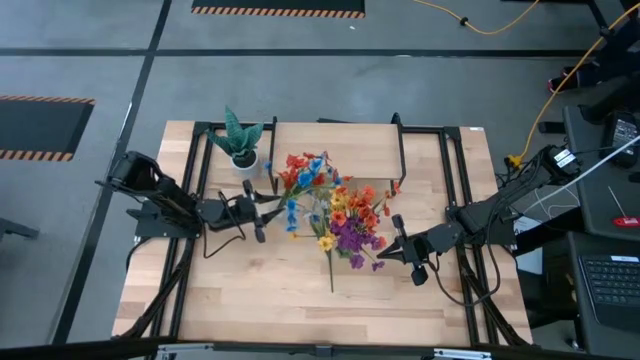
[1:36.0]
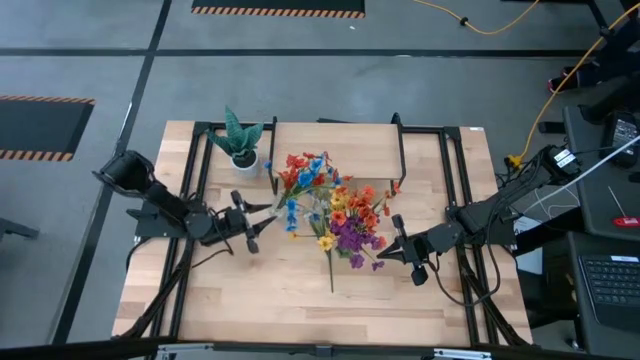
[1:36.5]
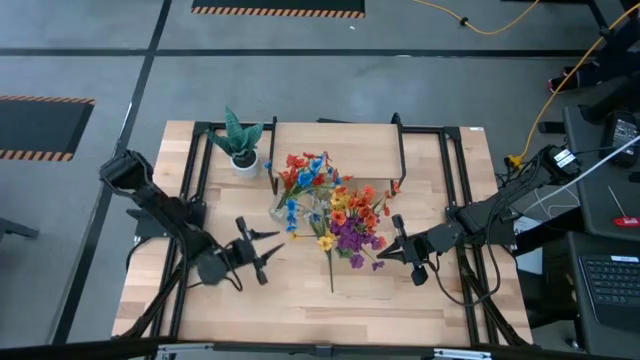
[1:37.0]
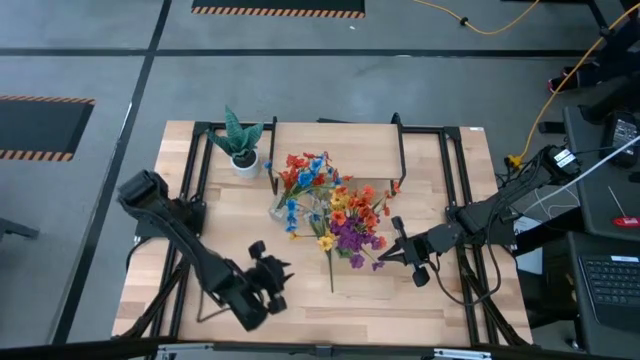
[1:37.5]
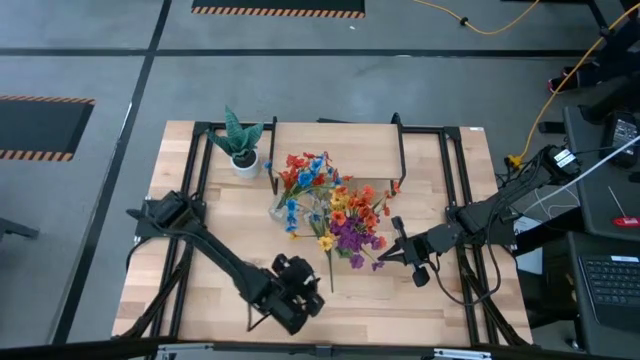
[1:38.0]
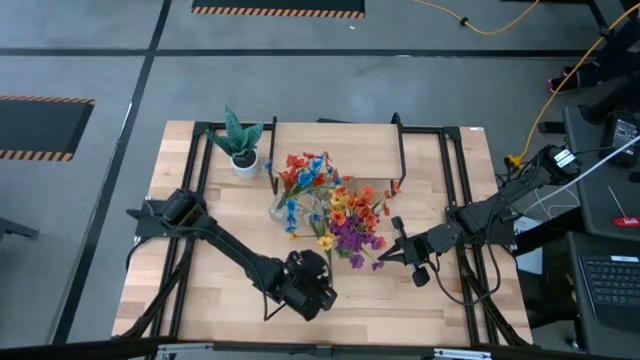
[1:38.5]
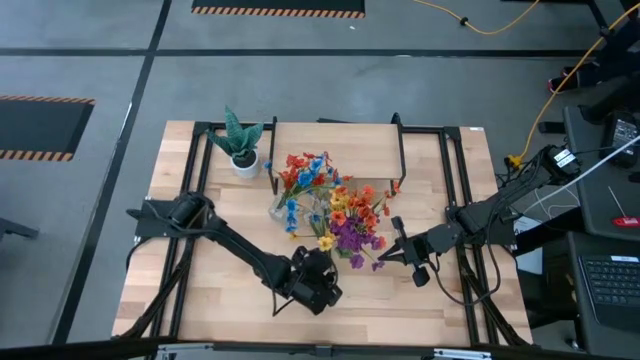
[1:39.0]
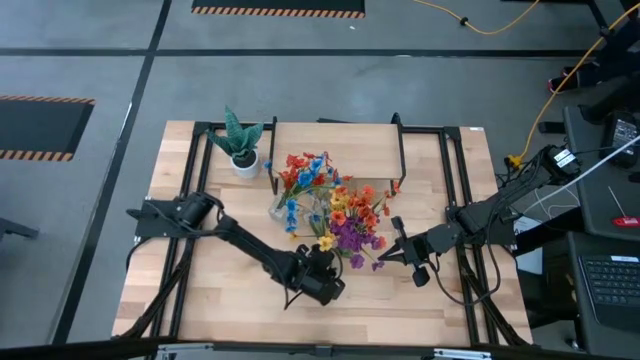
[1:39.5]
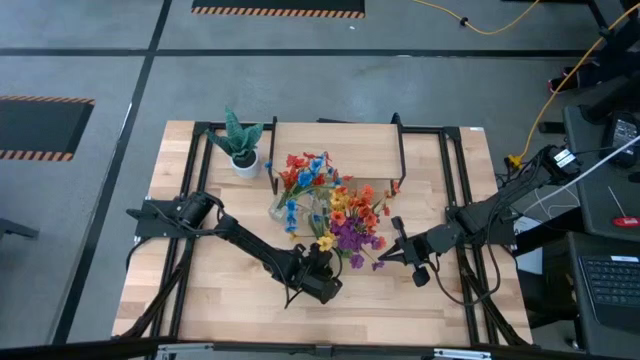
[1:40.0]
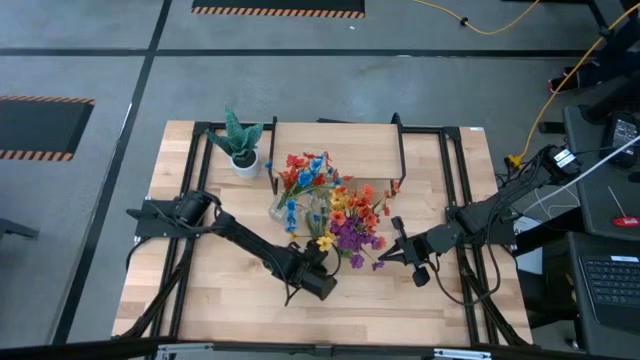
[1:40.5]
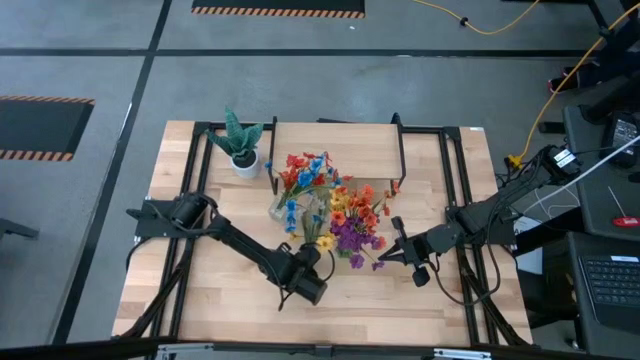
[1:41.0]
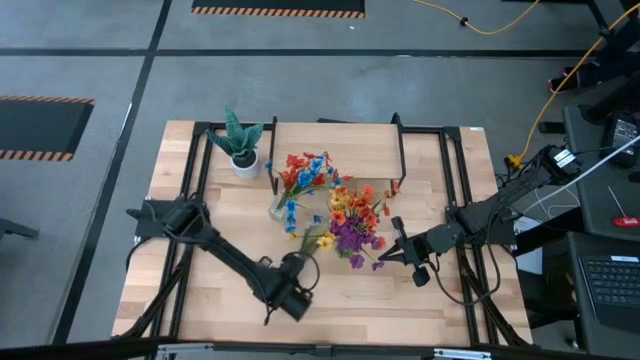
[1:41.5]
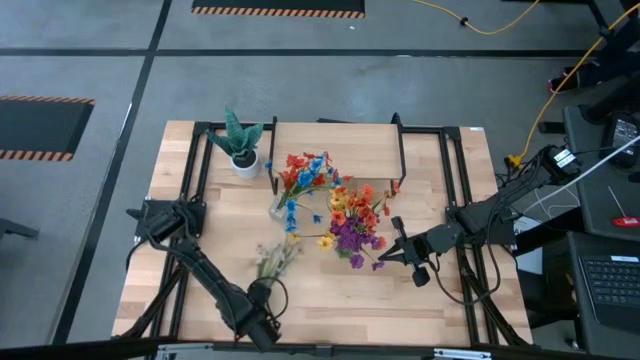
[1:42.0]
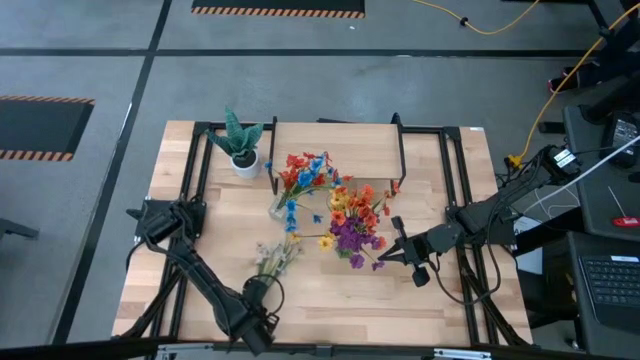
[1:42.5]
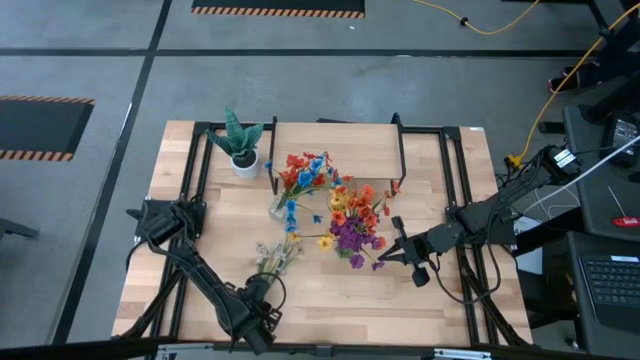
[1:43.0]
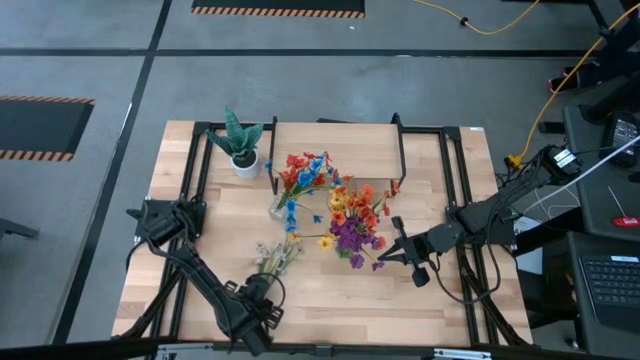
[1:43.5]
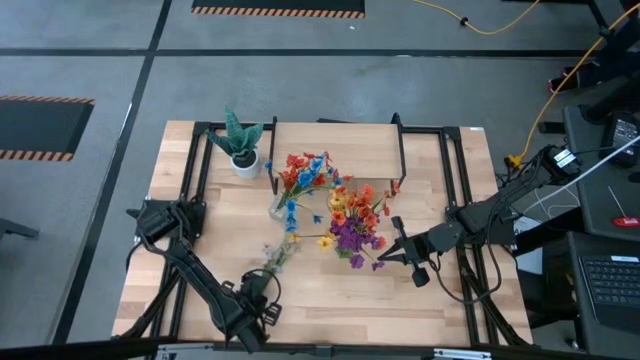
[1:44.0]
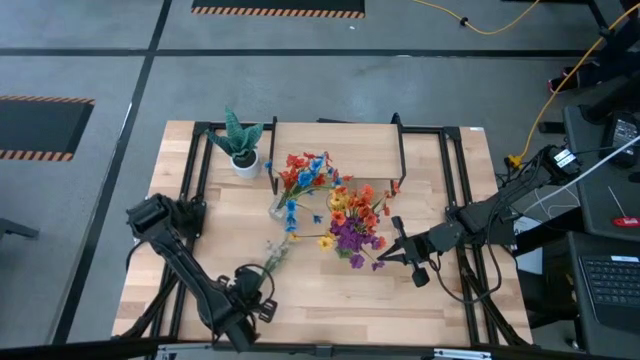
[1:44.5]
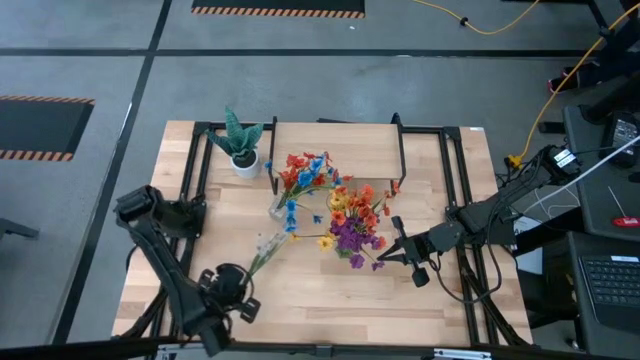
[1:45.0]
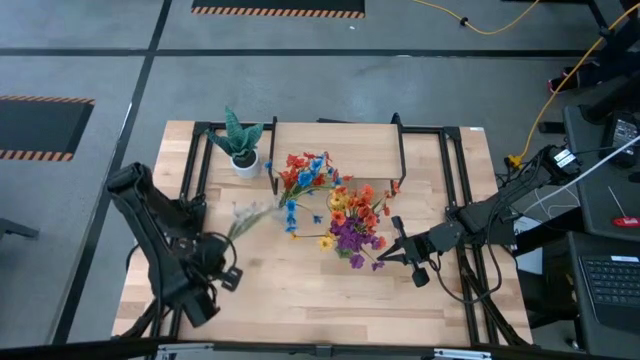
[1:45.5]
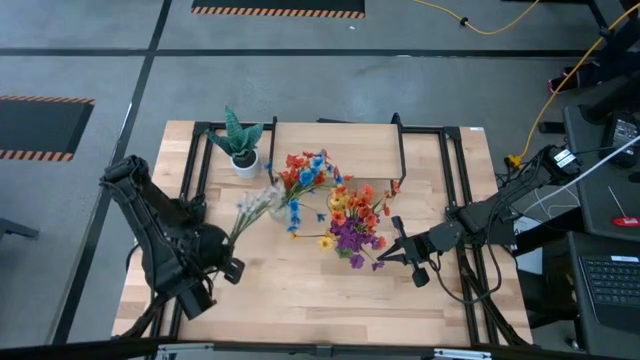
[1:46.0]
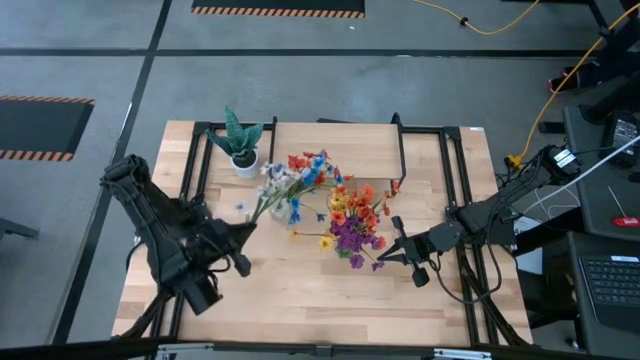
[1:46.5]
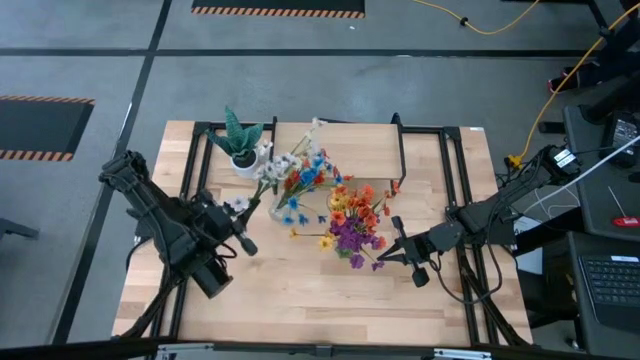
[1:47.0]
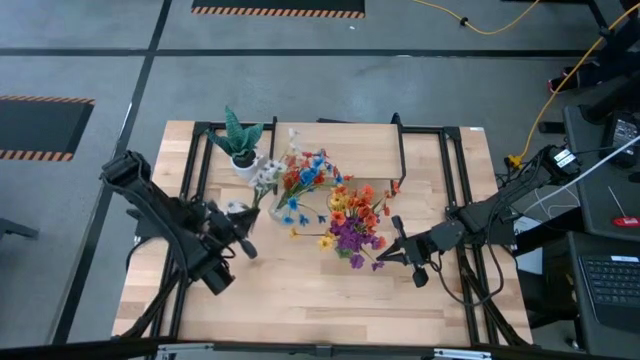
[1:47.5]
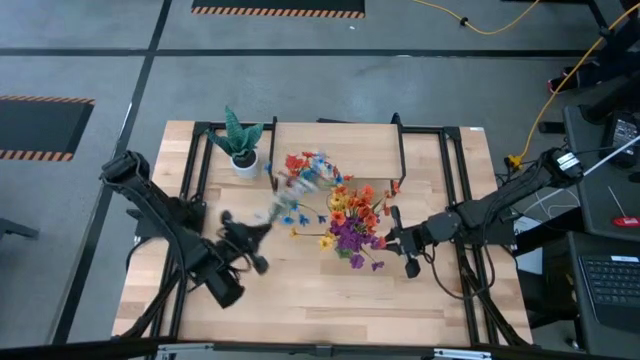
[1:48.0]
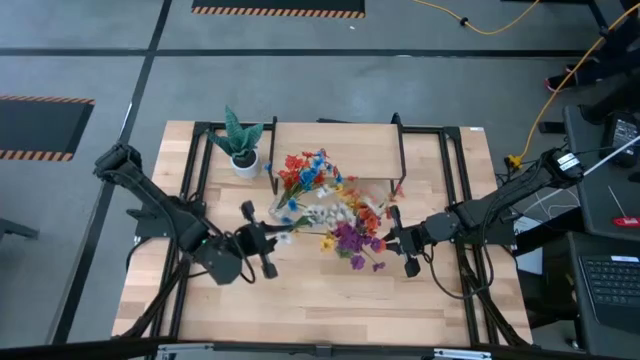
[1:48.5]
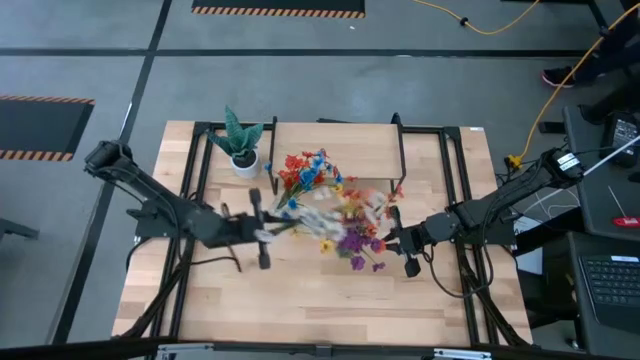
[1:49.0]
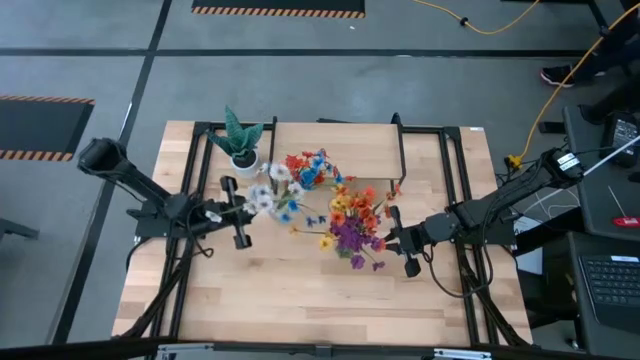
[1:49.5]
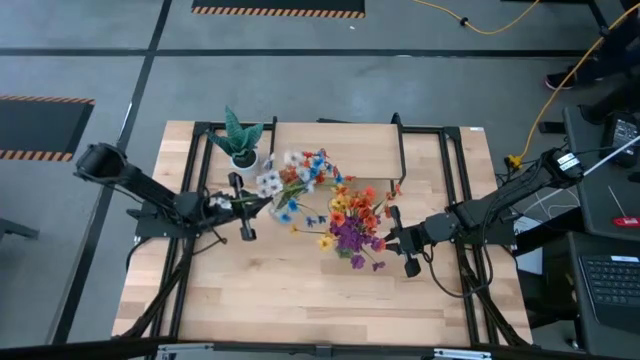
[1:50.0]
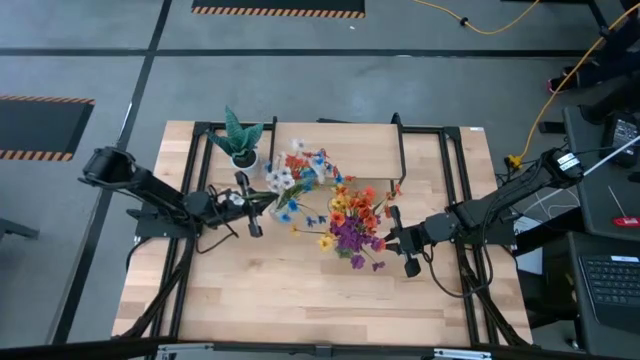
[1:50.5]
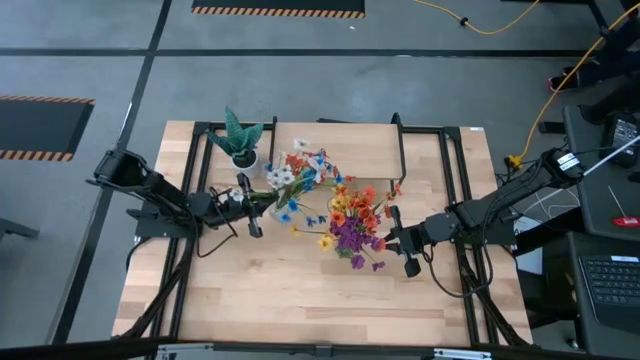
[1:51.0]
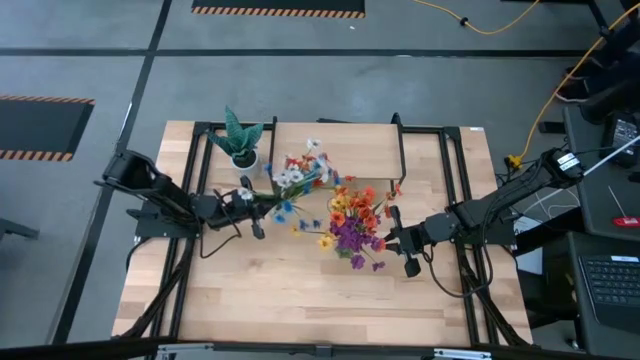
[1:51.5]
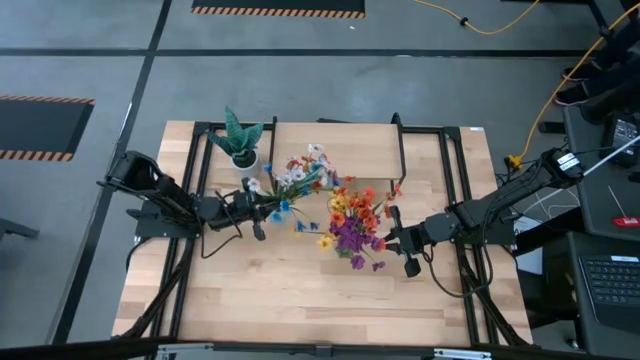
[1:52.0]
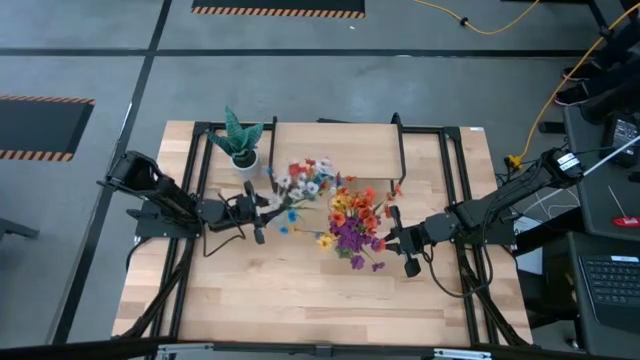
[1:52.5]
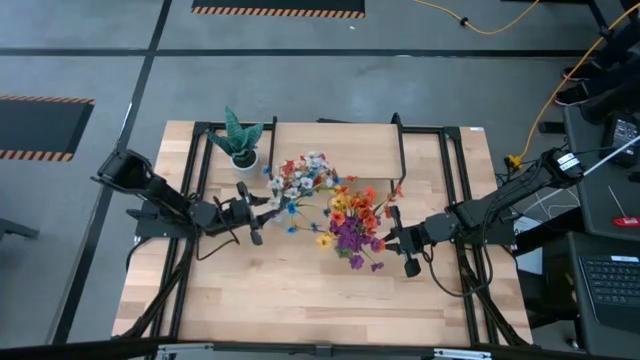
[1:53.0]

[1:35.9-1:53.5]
Task: Pick and place flowers into a vace then onto a shelf
Put the white flowers into the transparent vase

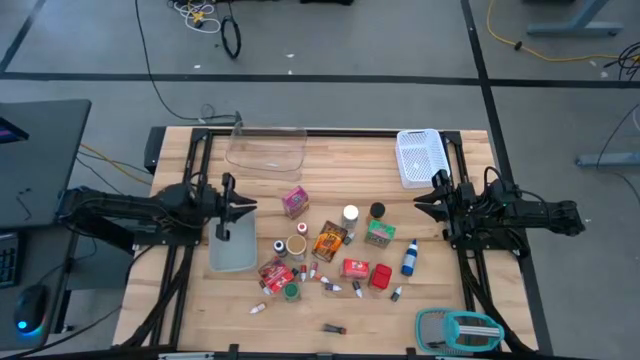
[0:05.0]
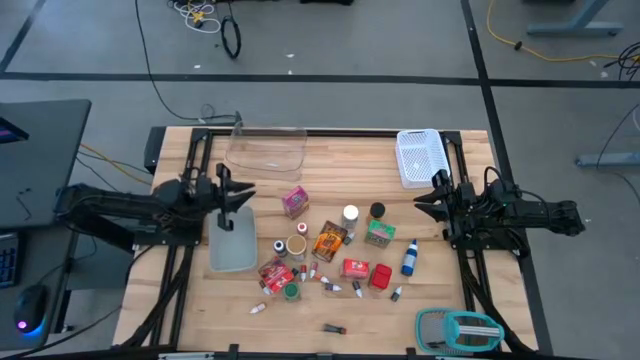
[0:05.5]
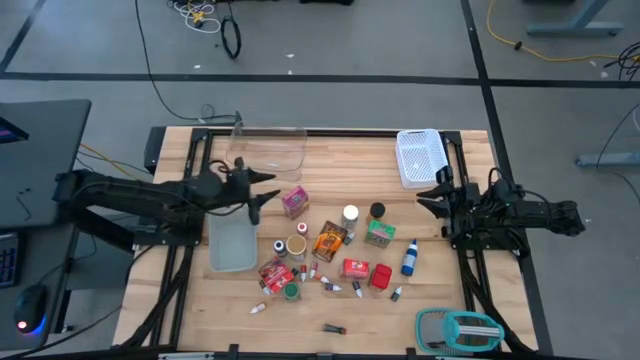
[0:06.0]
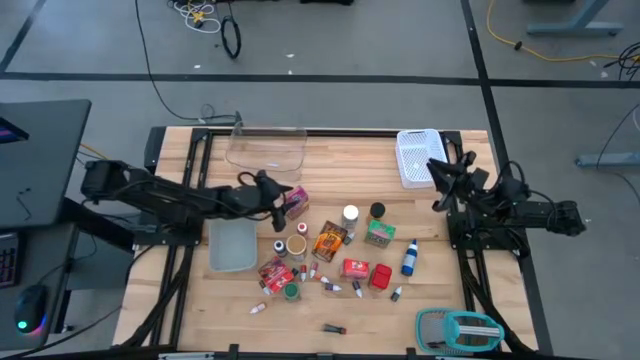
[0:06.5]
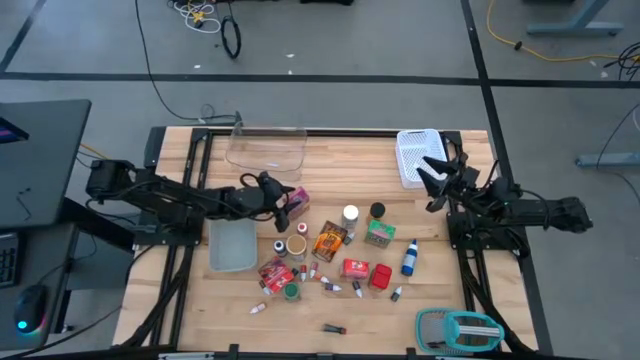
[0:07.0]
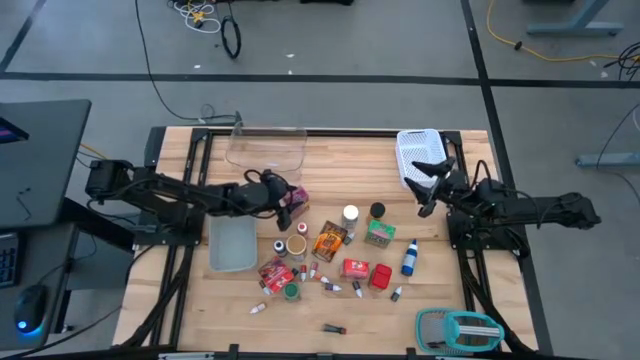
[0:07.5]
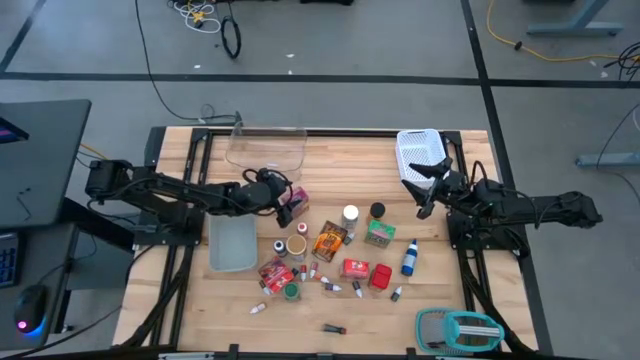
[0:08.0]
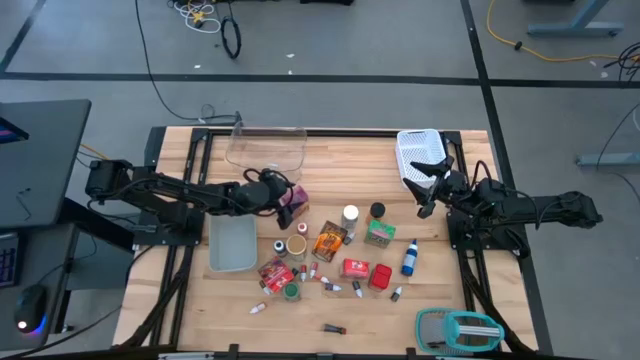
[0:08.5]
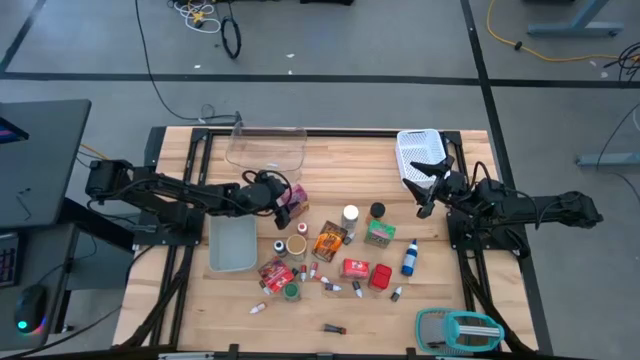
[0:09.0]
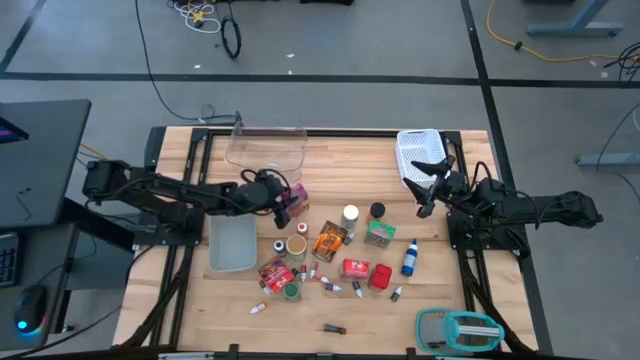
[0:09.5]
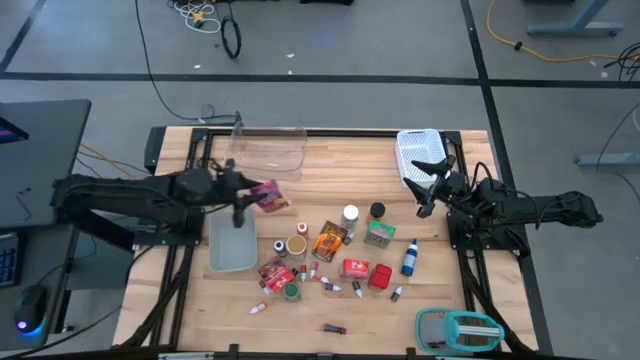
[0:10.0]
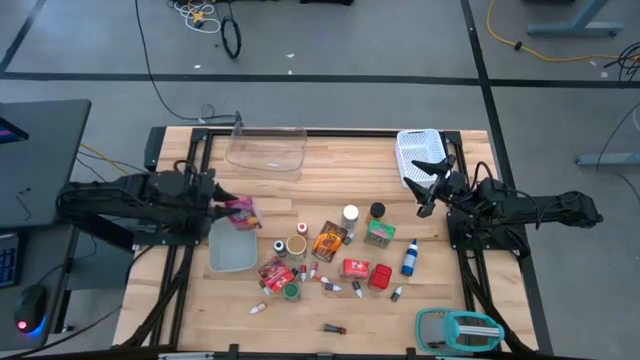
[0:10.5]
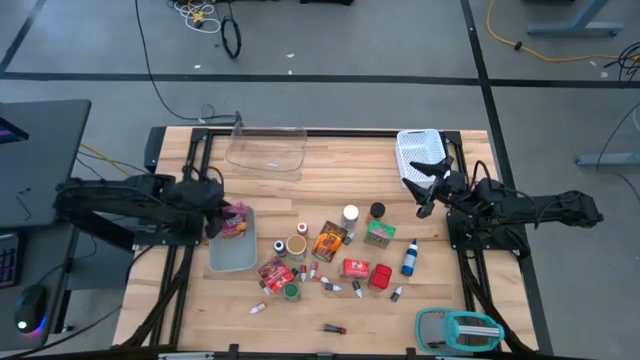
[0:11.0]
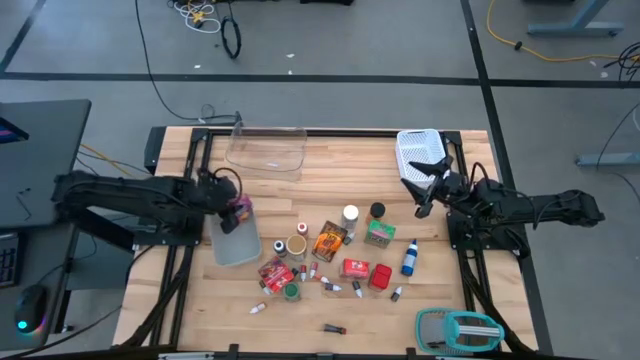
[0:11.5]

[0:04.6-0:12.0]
Task: Pick & Place Kitchen Items
Put the purple cereal box into the gray bin
